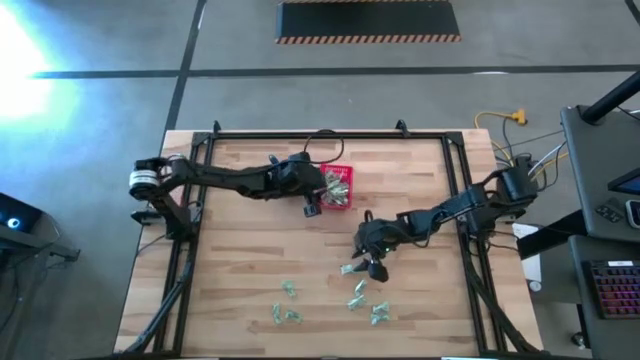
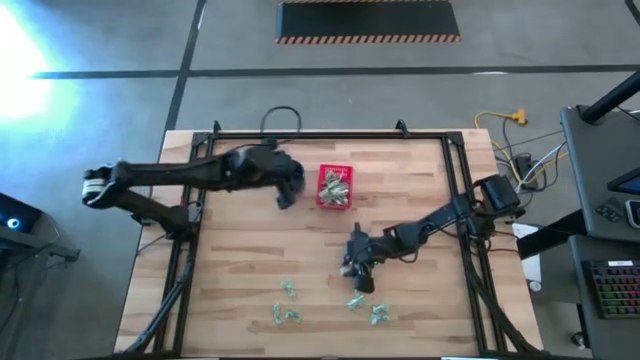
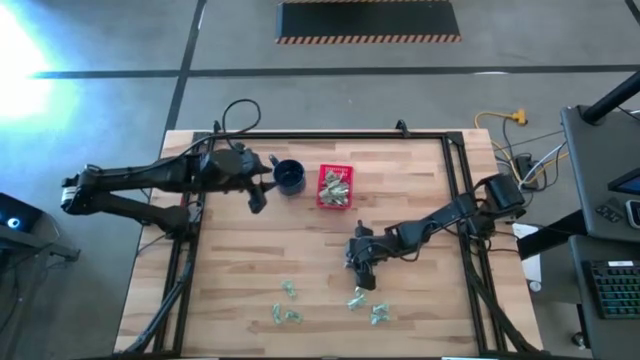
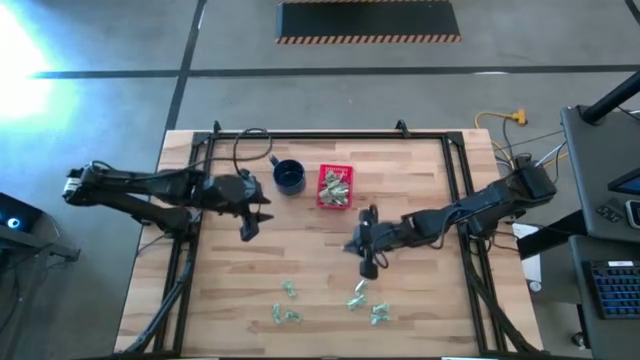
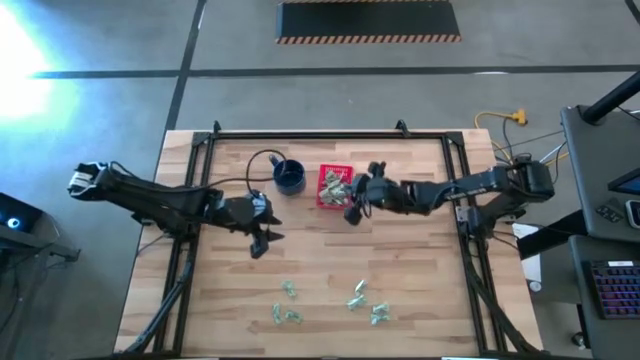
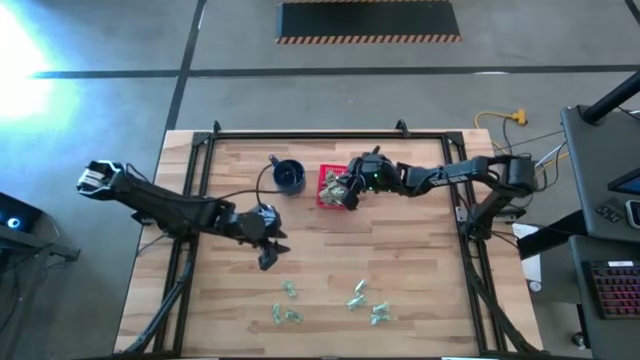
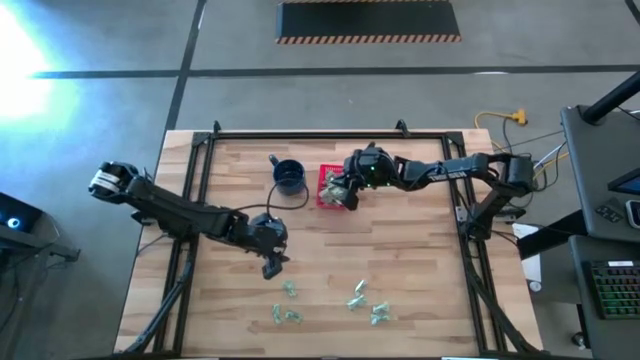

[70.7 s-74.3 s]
Task: Pick and place Stevia / Truvia into bins
Put the stevia packet into the basket

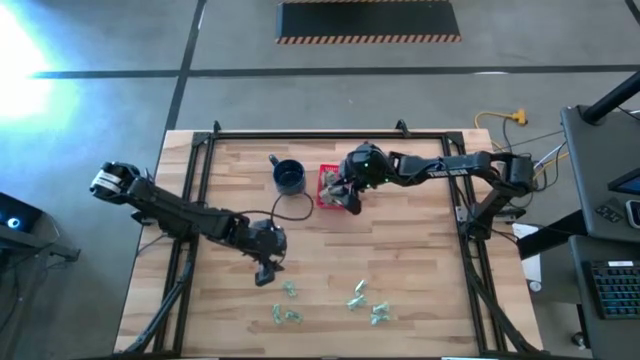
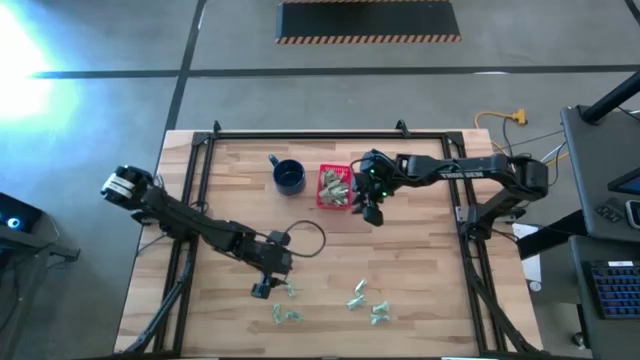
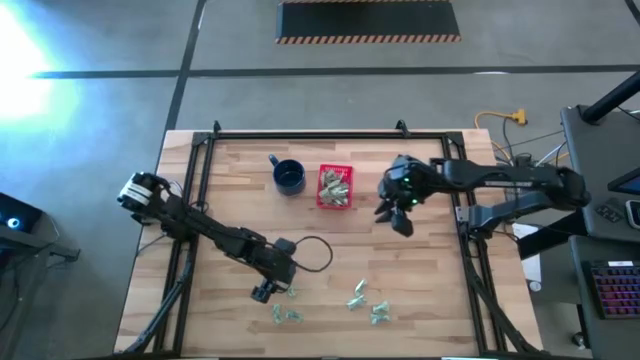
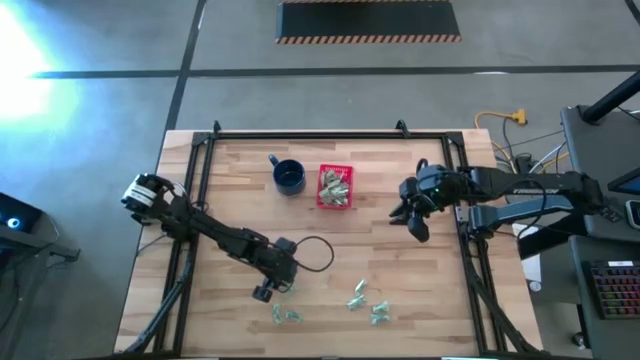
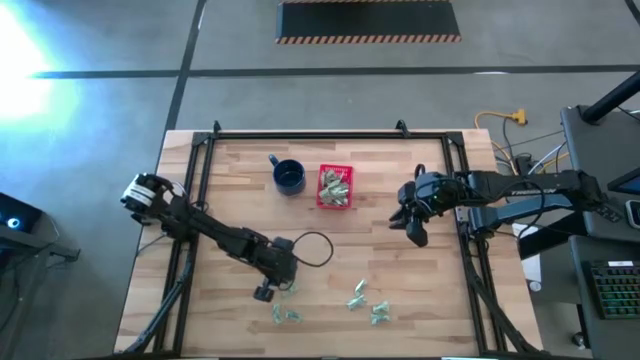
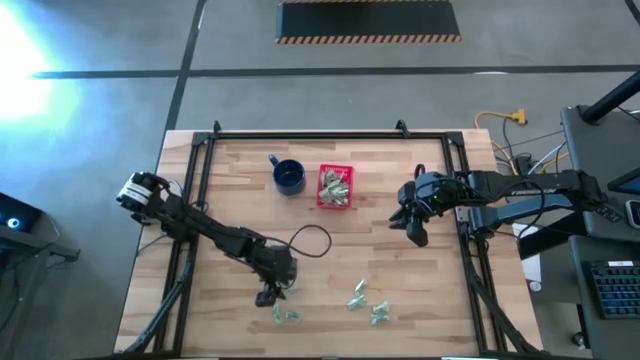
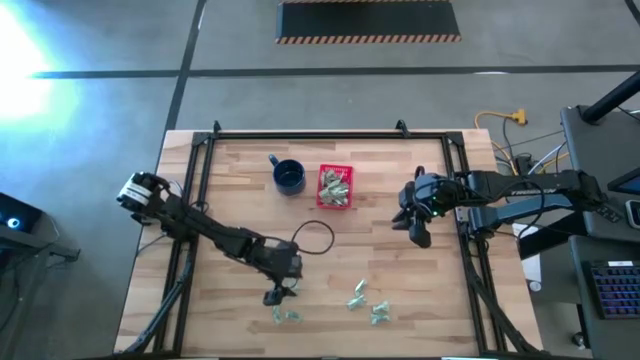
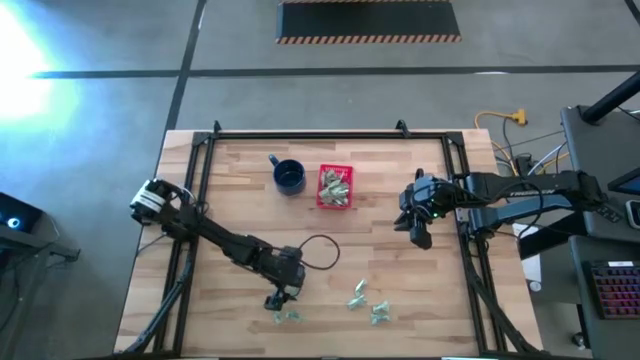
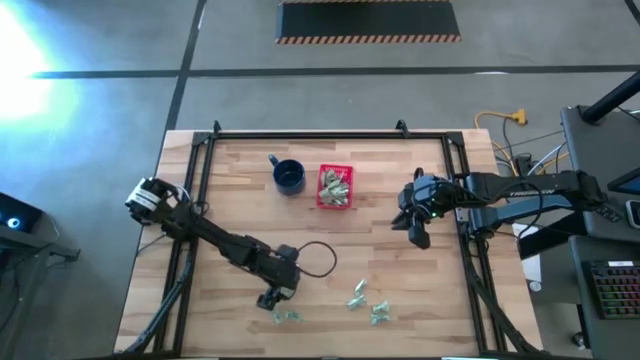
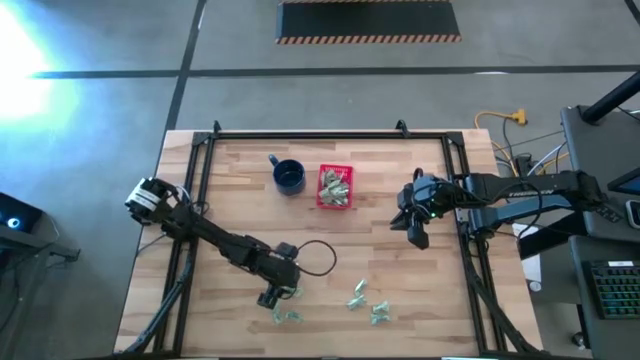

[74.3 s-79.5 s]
Put the stevia packet into the basket

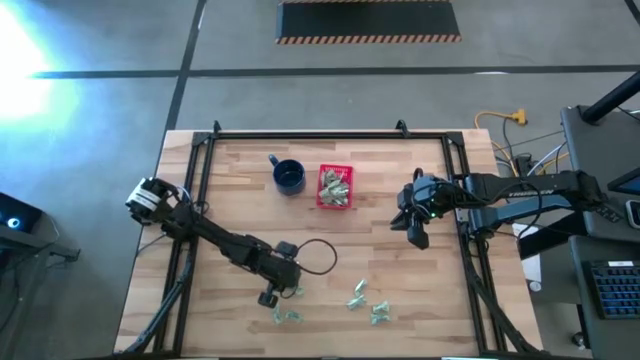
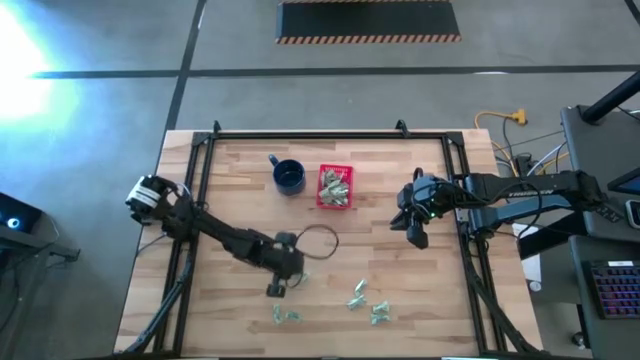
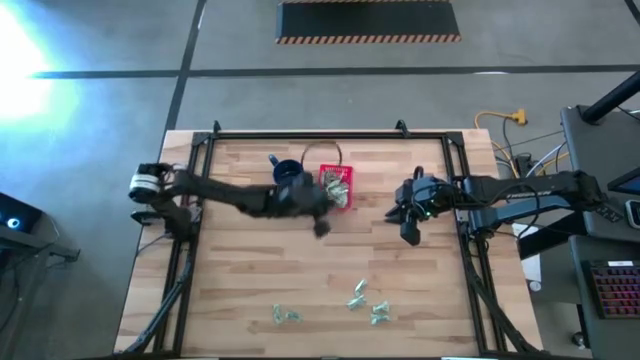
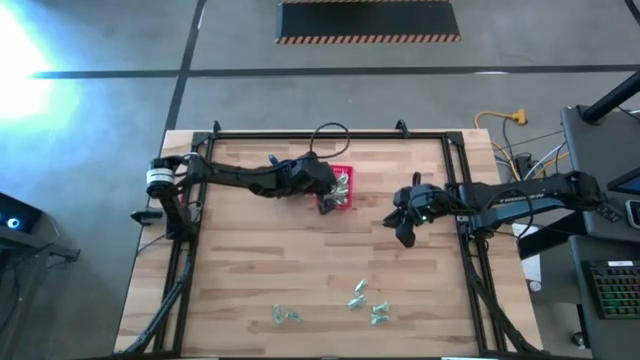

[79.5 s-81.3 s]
Put the stevia packet into the basket

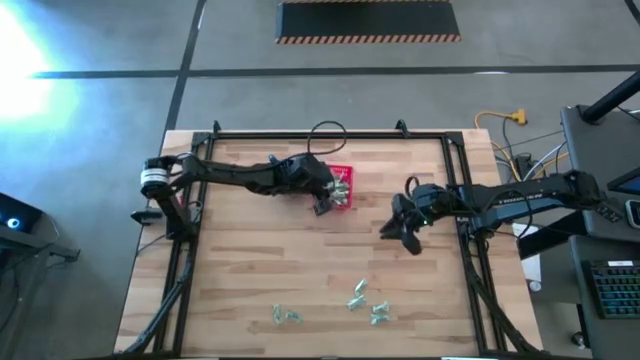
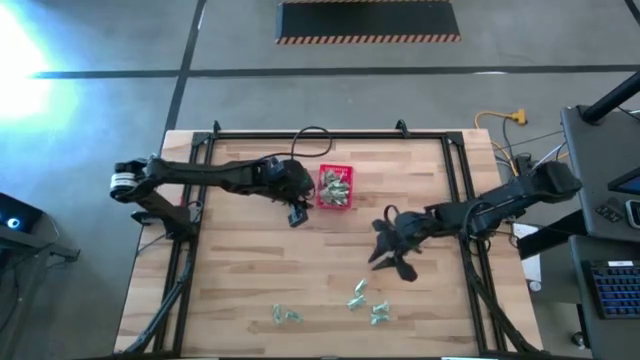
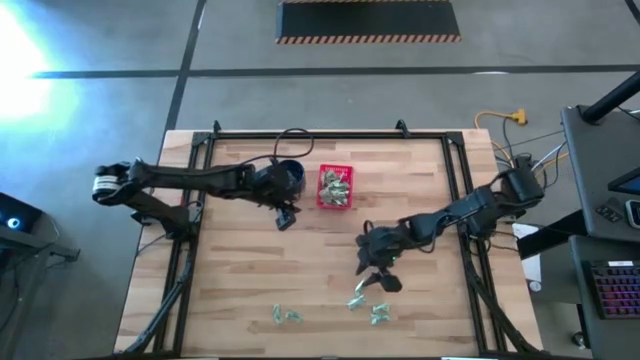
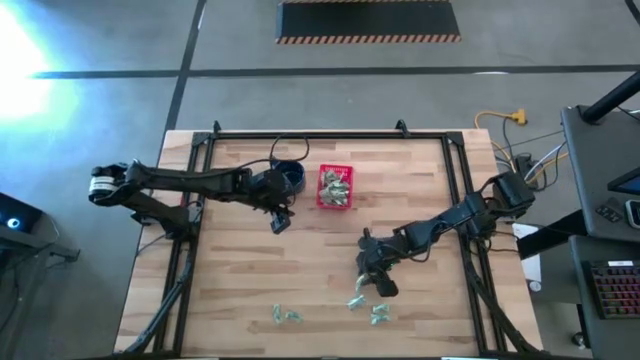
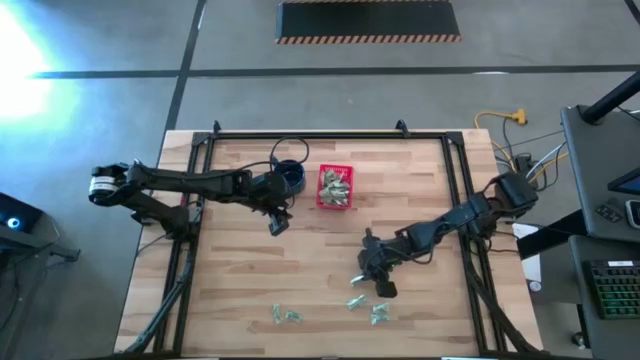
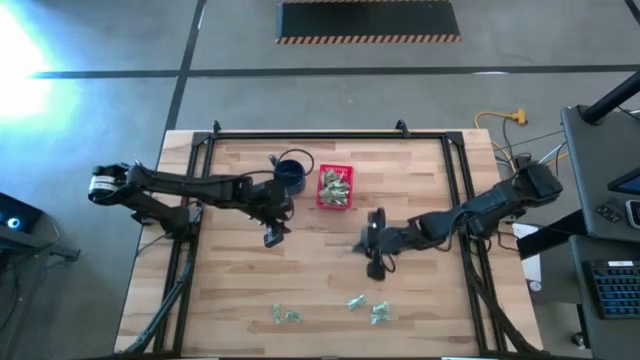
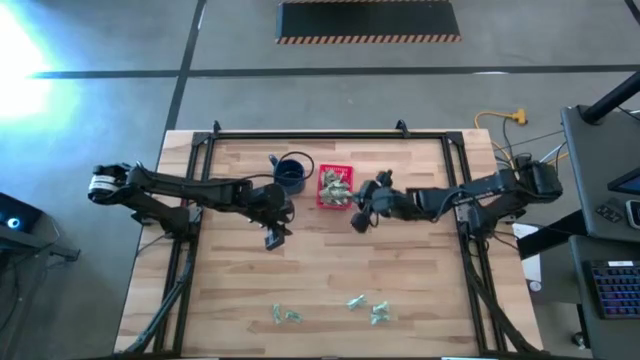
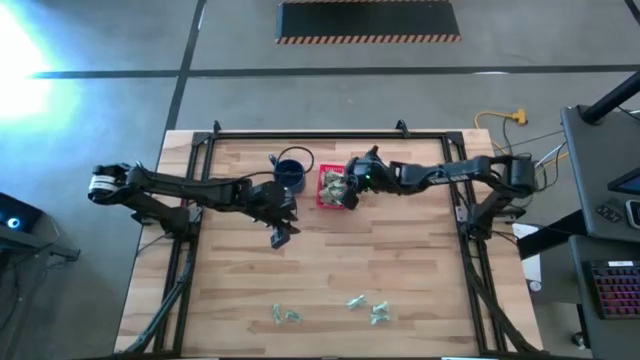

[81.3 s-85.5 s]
Put the stevia packet into the red basket

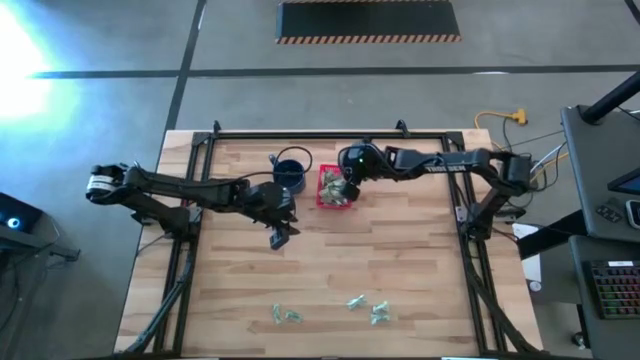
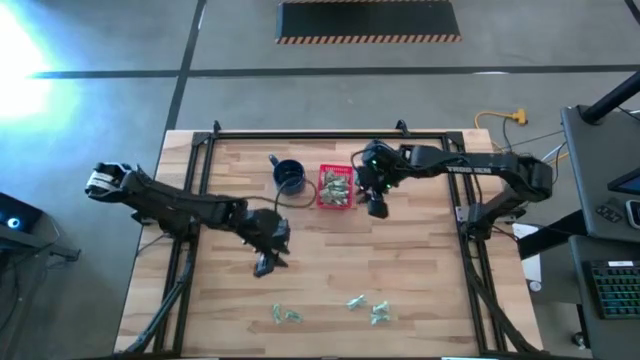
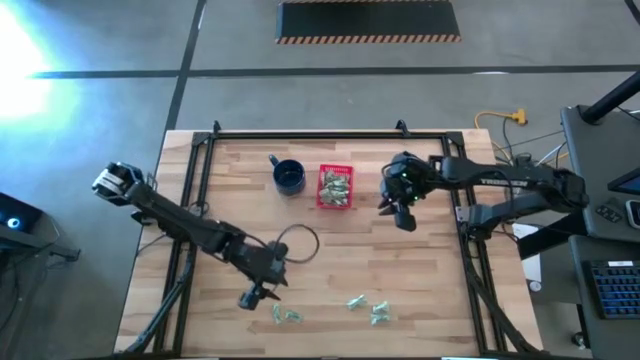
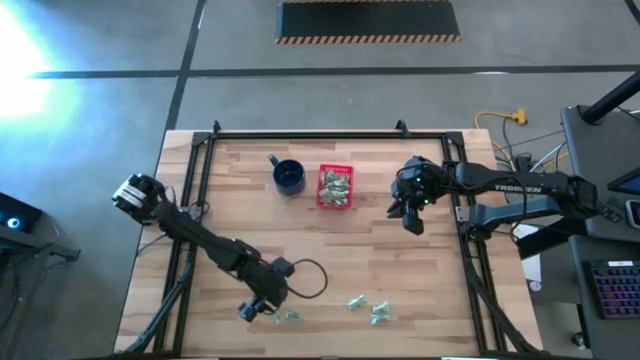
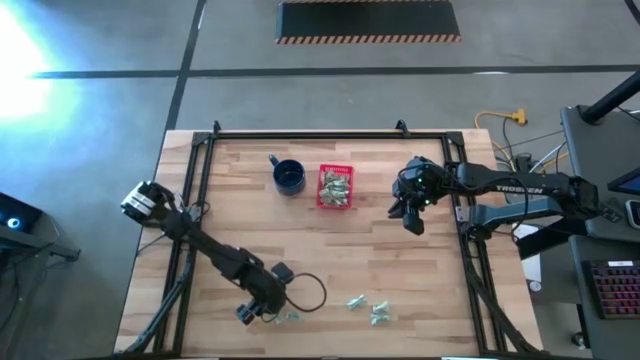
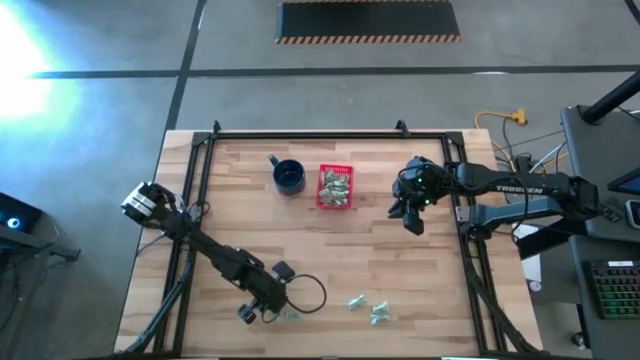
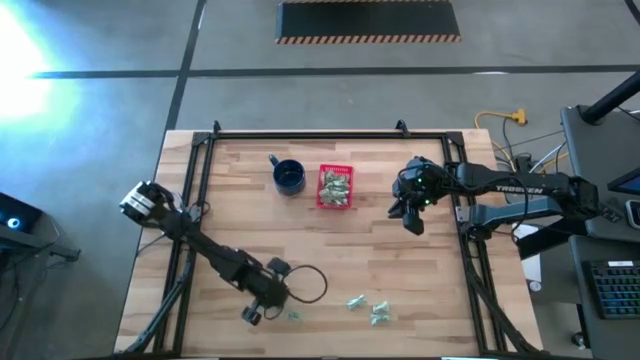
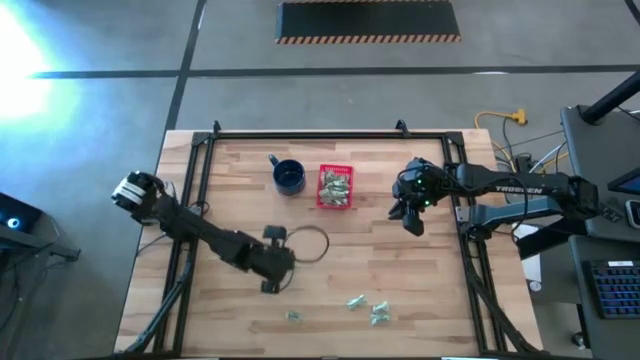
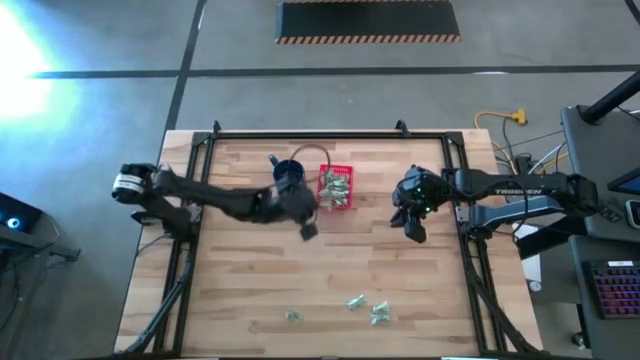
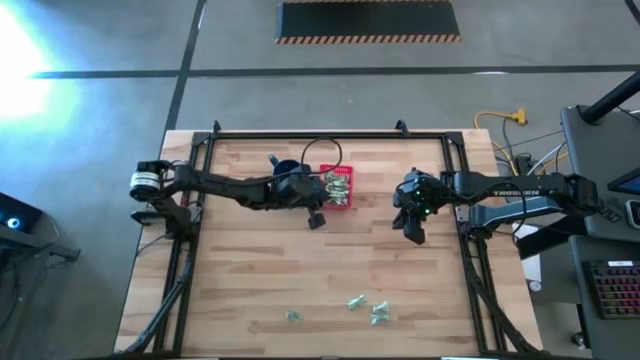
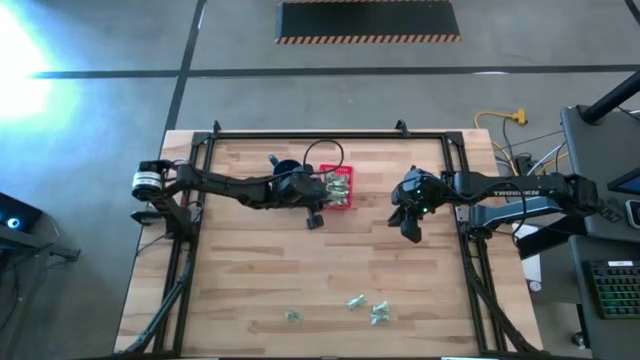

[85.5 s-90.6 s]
Put the stevia packet into the basket

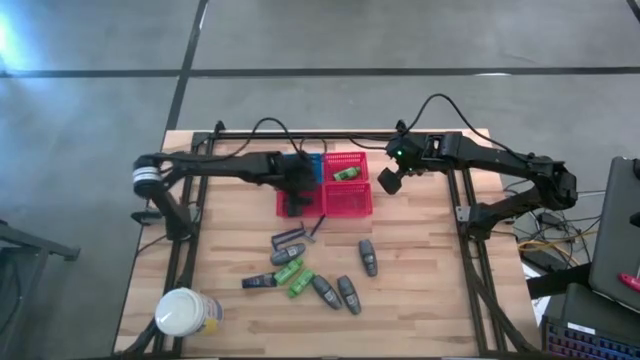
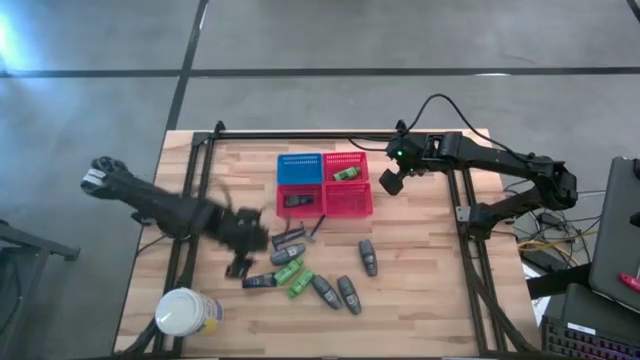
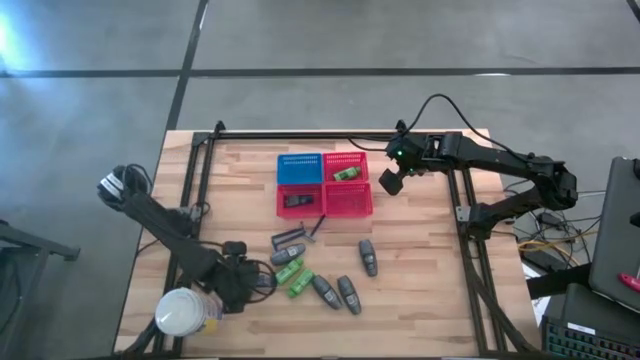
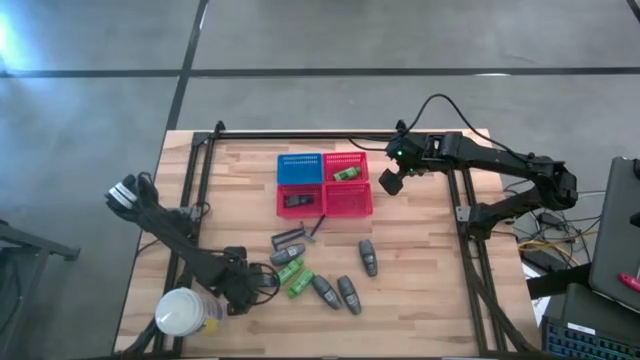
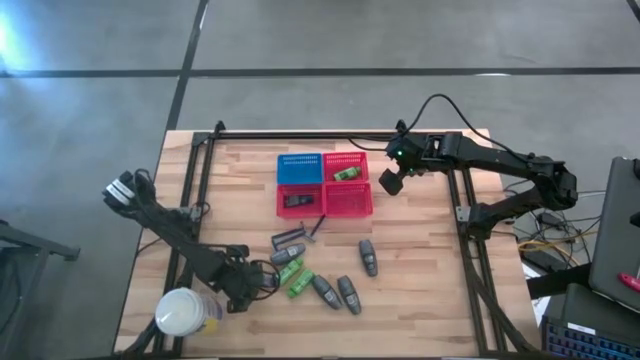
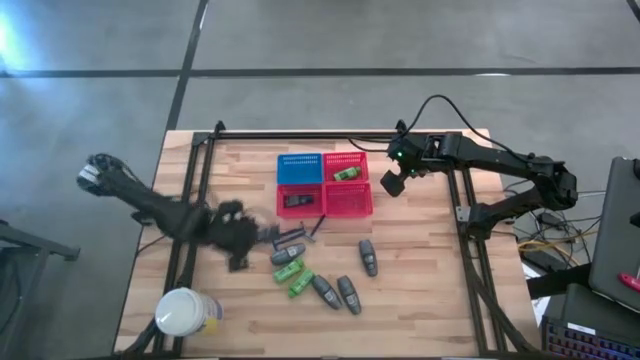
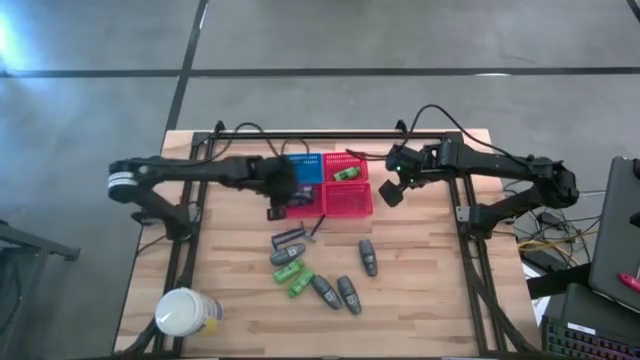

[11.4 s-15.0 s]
Task: Pick & Place Travel size toiletries
Put the shave cream into the bottom left red bin
